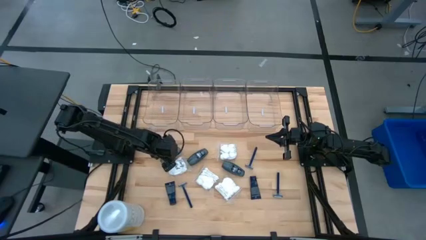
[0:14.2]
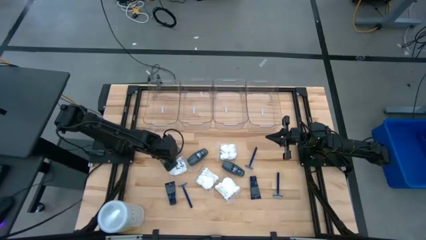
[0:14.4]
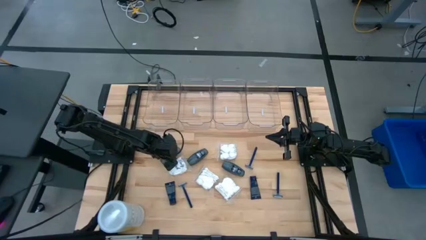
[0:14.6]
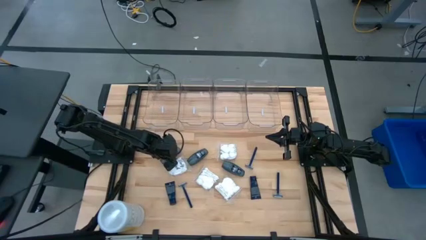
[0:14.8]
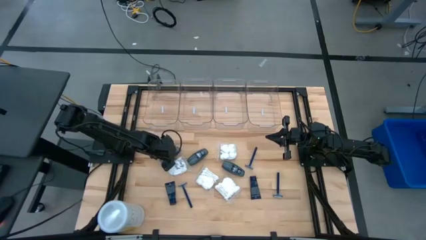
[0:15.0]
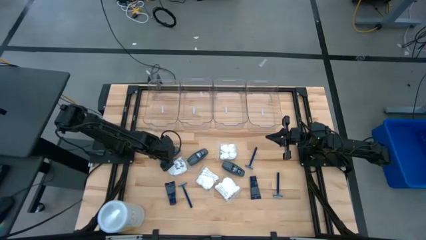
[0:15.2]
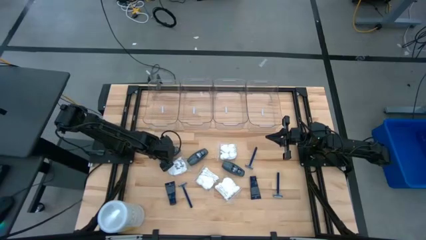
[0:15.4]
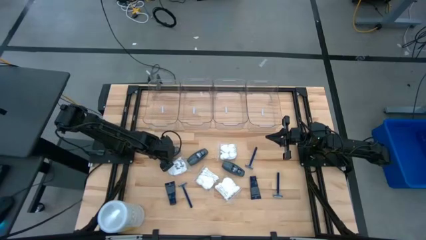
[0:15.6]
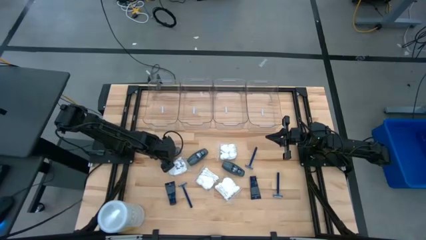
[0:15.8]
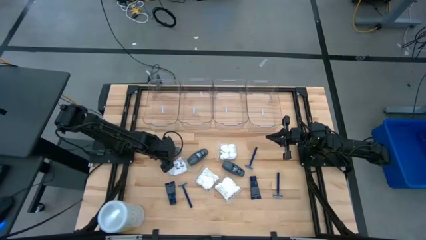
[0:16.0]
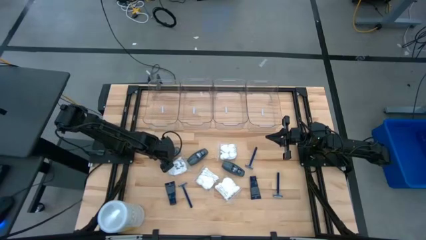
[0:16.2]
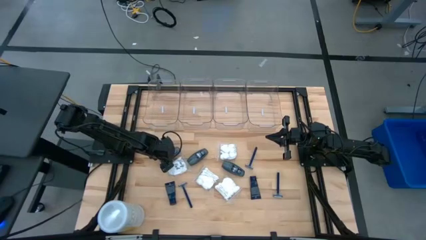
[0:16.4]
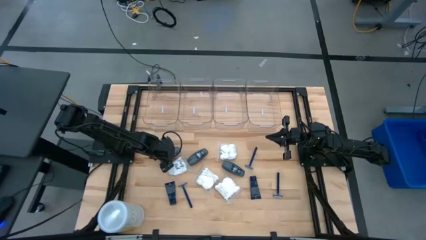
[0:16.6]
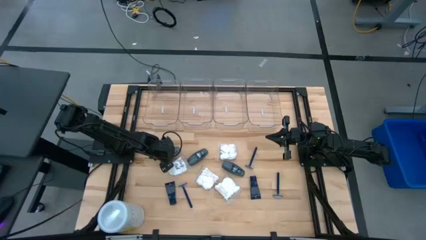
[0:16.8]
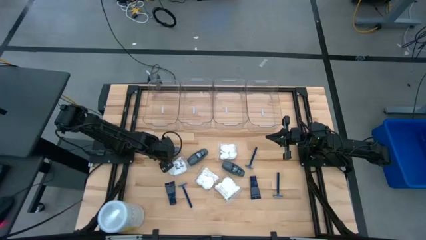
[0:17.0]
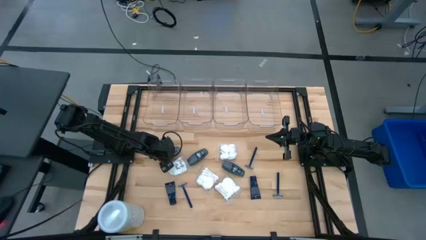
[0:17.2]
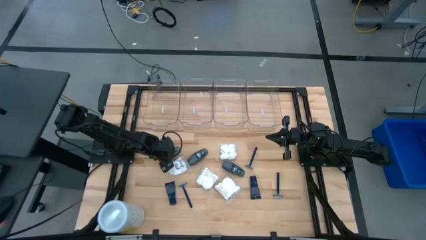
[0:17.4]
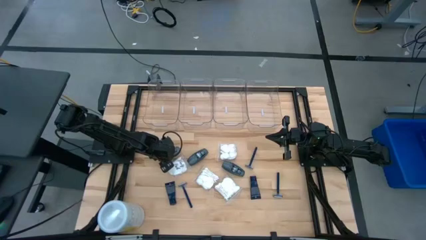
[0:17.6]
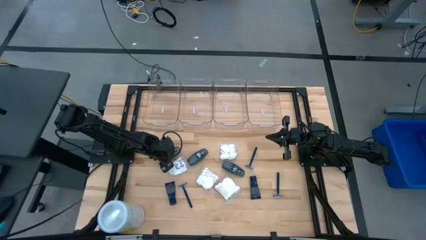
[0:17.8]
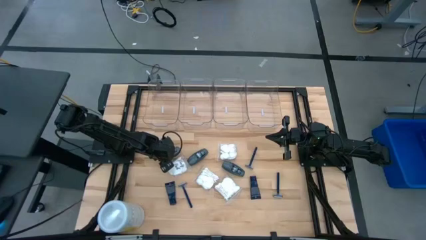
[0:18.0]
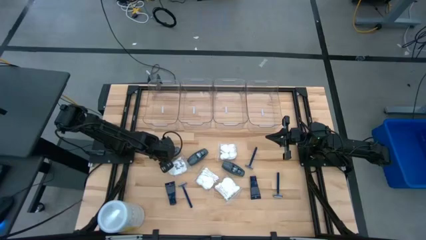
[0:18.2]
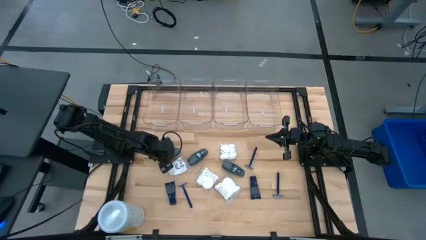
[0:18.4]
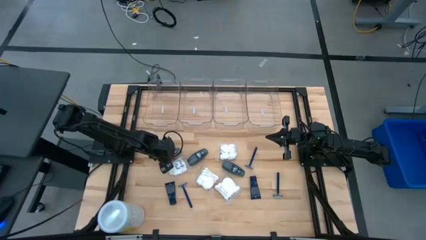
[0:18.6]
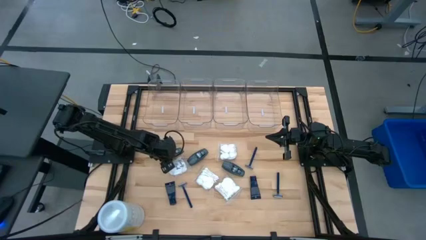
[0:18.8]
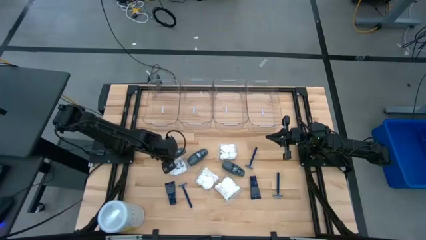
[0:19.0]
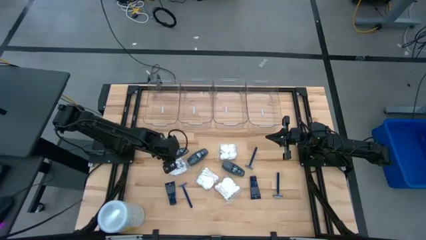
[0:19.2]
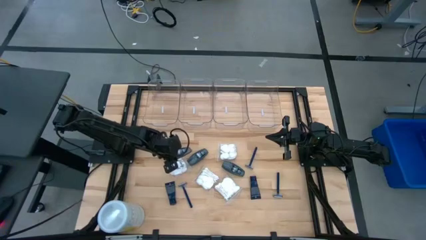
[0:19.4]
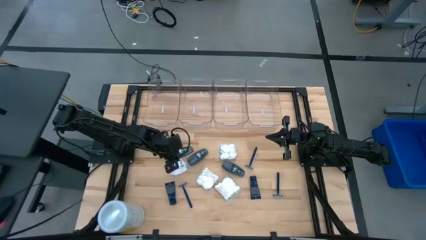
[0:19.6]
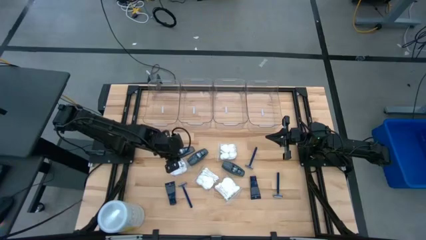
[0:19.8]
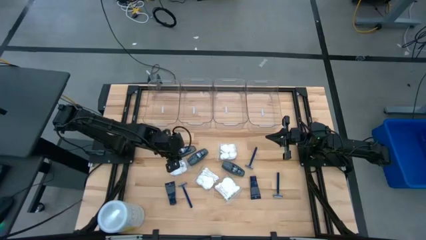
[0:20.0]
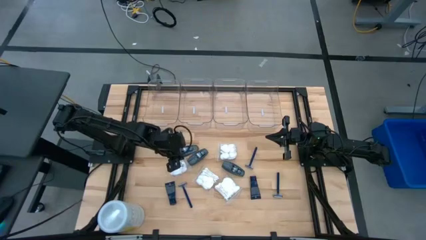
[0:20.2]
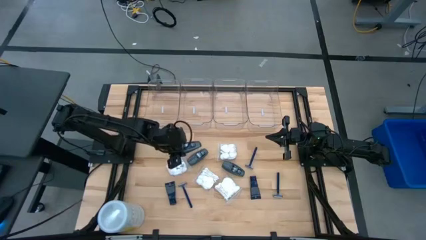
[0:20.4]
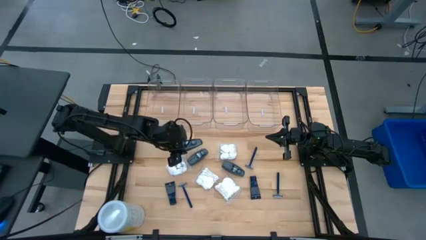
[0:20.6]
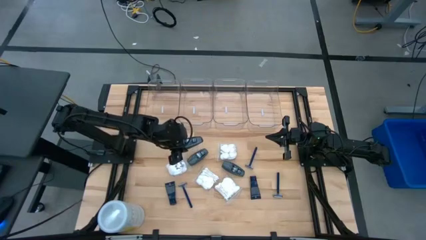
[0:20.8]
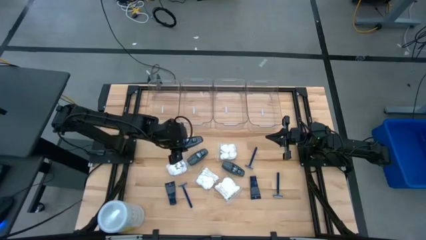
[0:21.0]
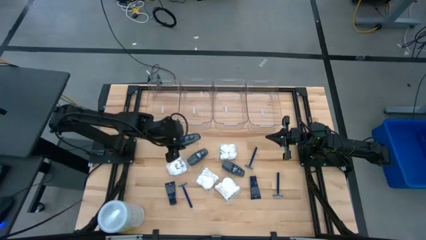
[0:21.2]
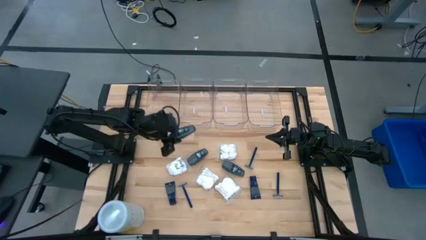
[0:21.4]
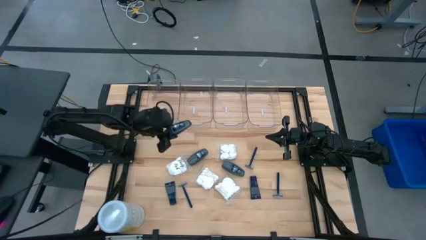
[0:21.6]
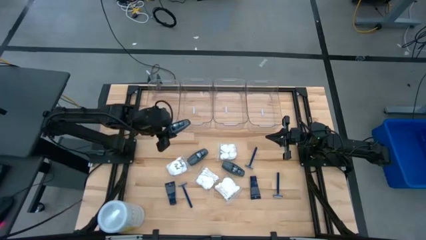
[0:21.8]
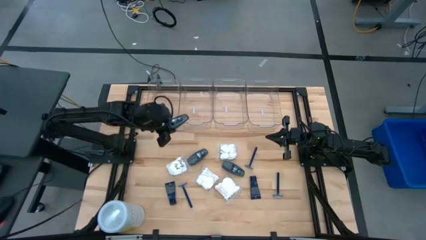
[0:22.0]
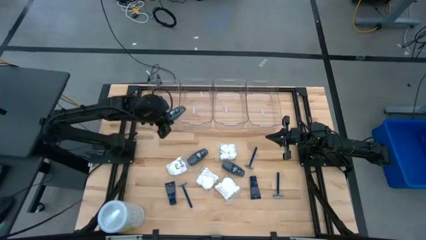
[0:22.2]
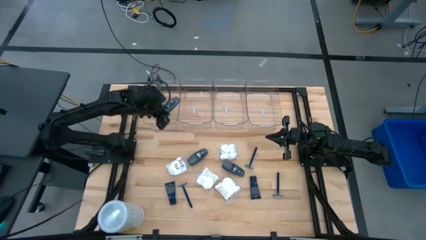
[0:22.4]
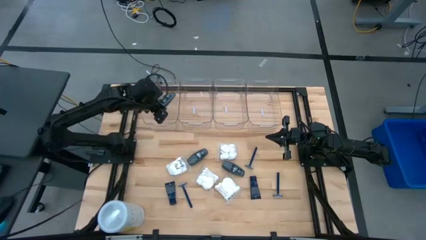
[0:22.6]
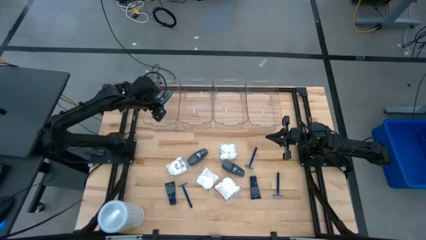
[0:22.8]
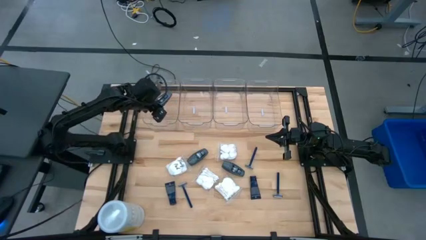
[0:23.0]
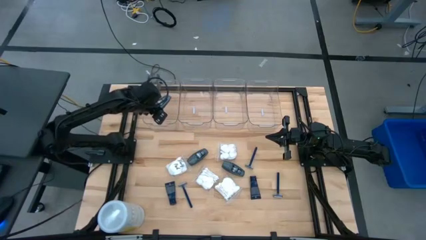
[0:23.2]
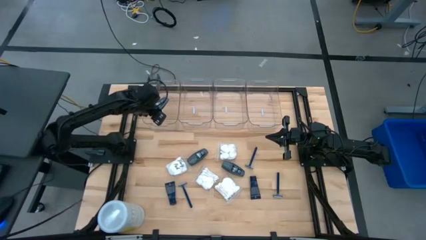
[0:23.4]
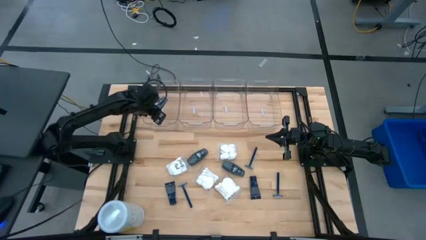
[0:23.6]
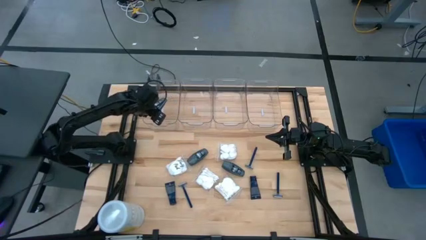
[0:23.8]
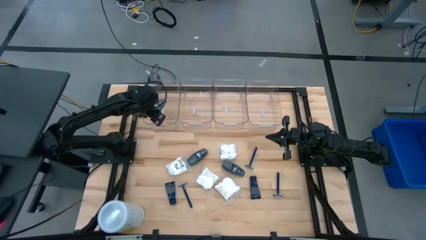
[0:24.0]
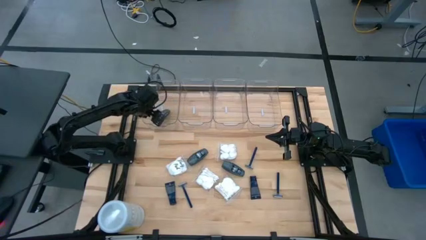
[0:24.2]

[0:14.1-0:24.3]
Task: Pick & Place Travel size toiletries
Put the left gray deodorant into the left transparent bin

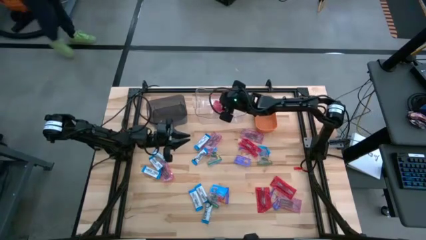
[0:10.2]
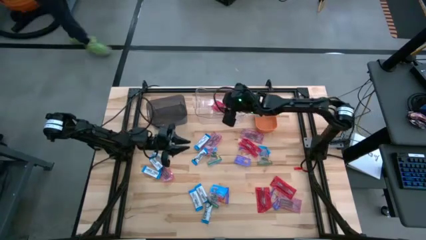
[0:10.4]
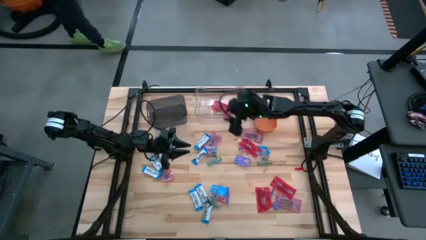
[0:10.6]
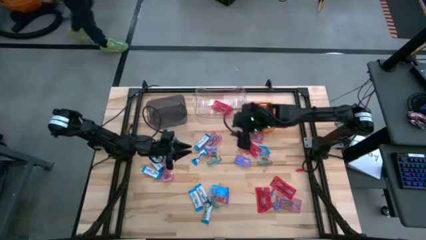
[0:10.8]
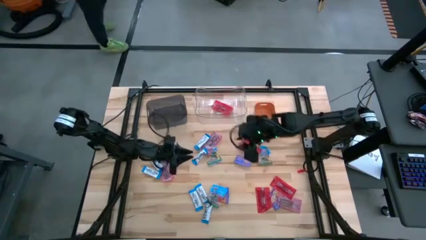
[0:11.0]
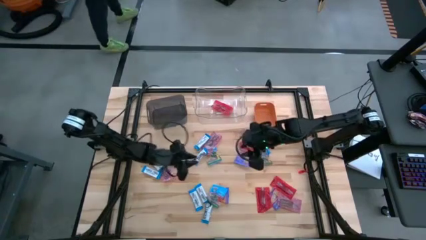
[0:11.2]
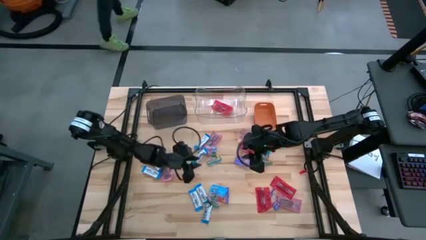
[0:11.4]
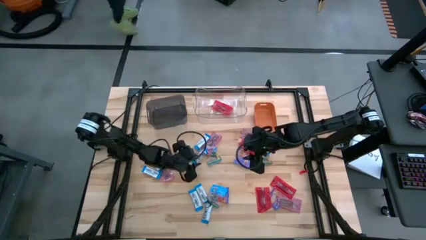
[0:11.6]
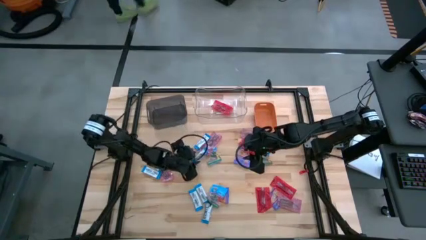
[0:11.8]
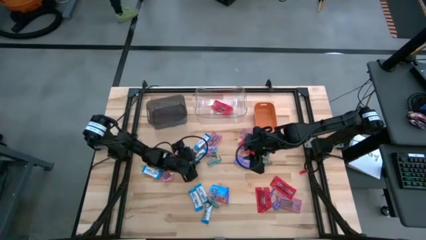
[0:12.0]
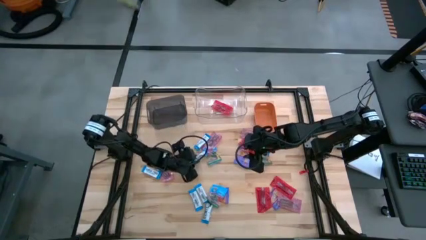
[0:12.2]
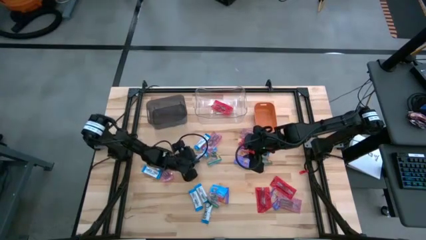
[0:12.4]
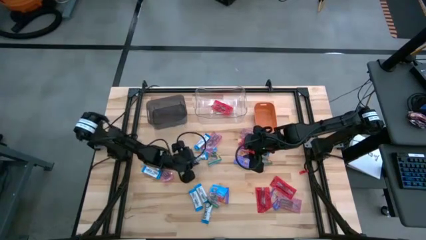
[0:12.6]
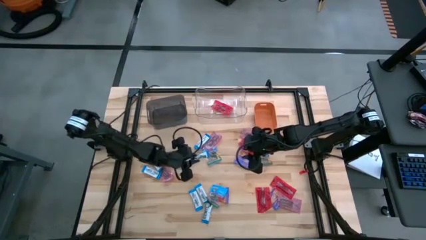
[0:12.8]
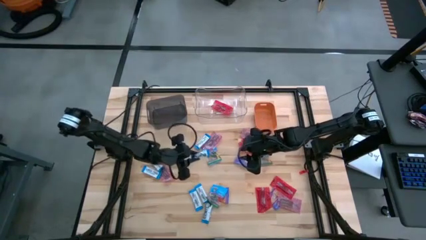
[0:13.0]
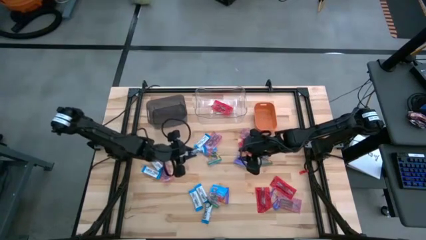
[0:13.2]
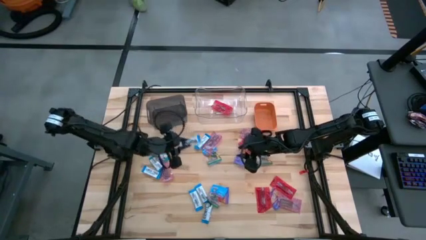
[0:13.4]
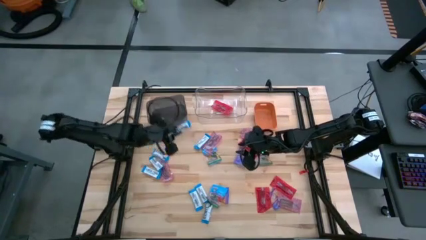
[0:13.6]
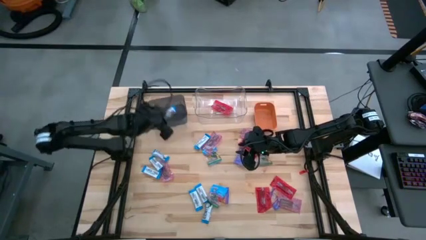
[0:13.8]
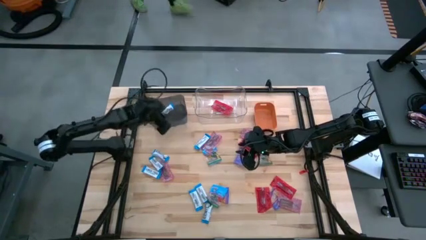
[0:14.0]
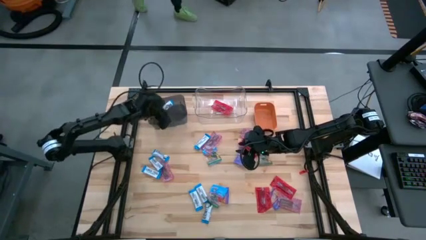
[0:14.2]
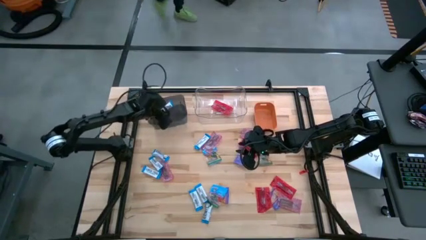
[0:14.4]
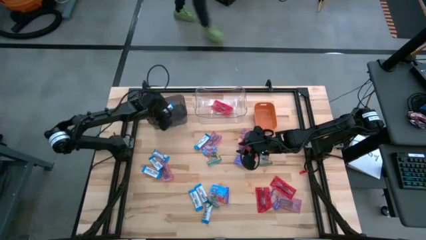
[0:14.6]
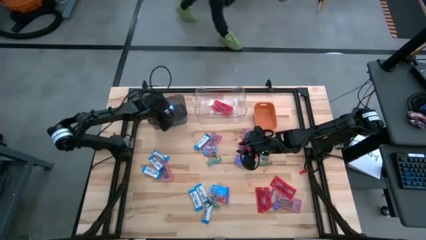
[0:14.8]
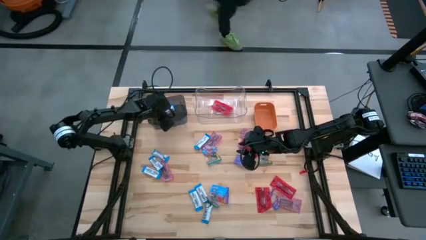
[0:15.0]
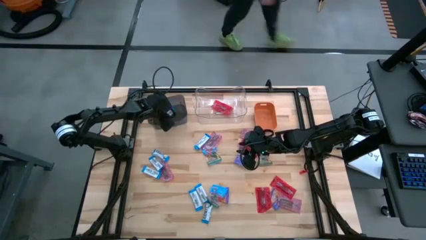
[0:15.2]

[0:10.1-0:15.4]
Task: Sort candy
Put the white chocolate into the black bin
